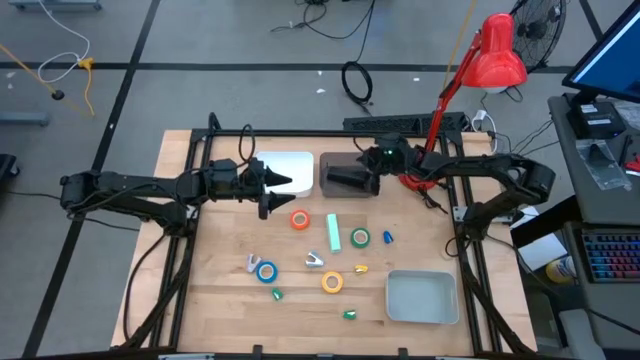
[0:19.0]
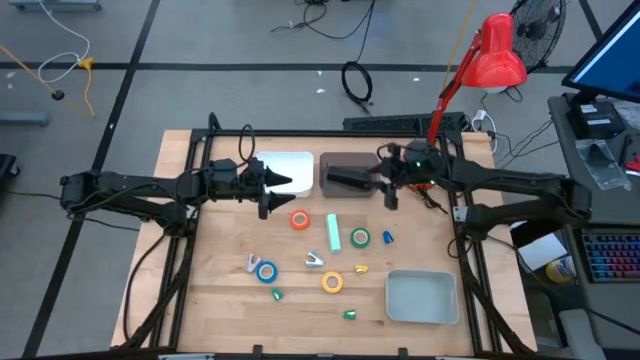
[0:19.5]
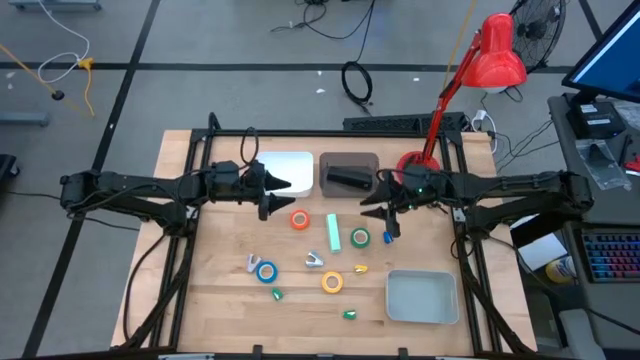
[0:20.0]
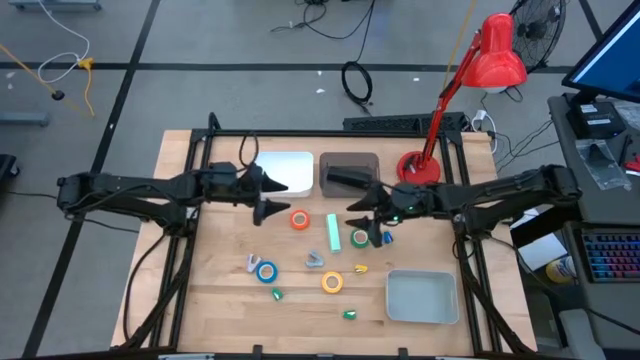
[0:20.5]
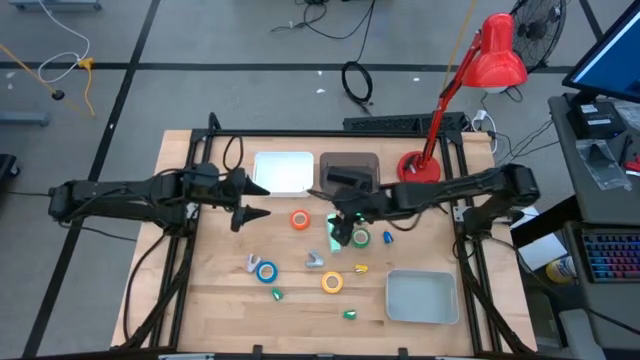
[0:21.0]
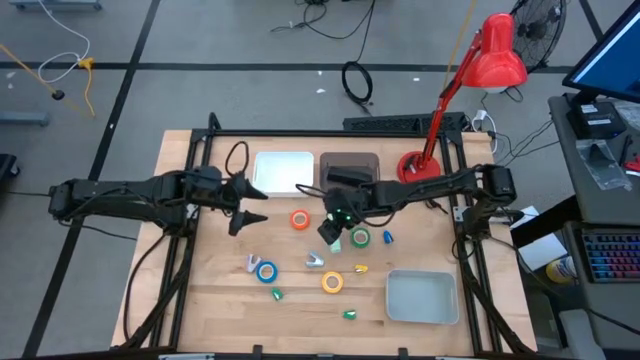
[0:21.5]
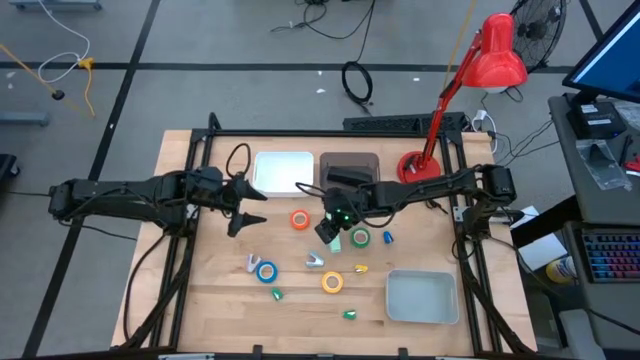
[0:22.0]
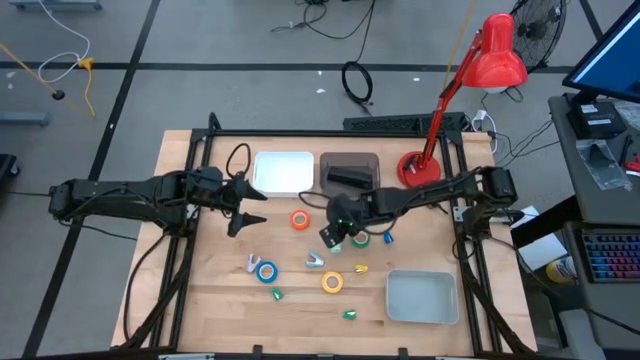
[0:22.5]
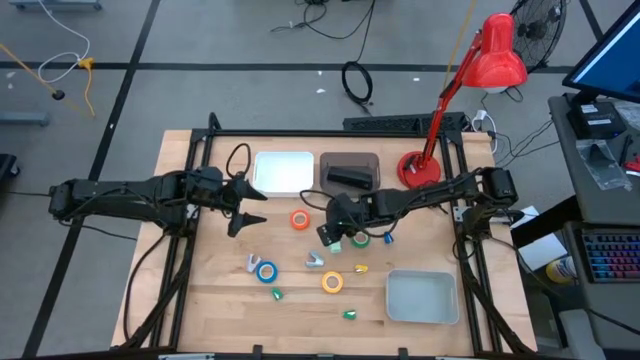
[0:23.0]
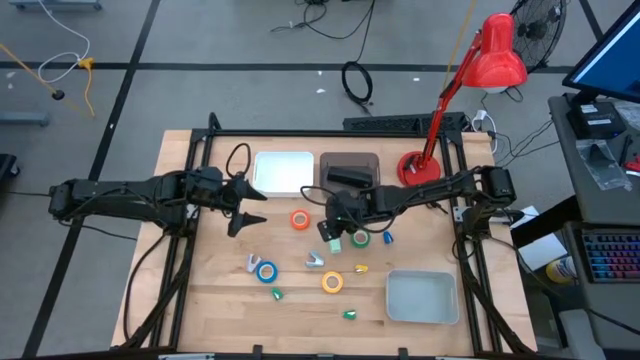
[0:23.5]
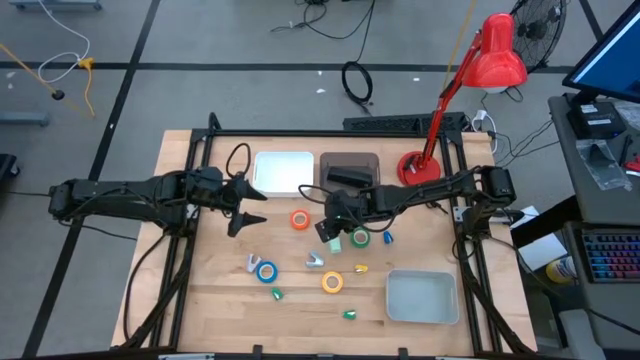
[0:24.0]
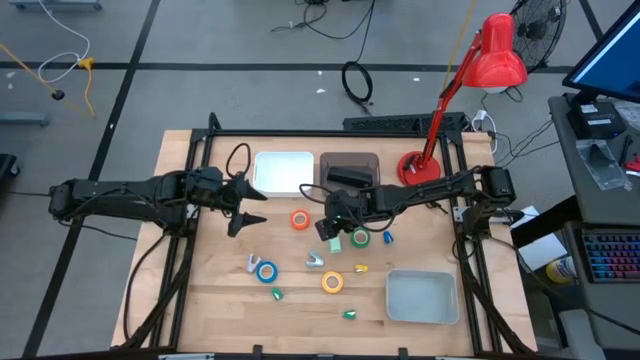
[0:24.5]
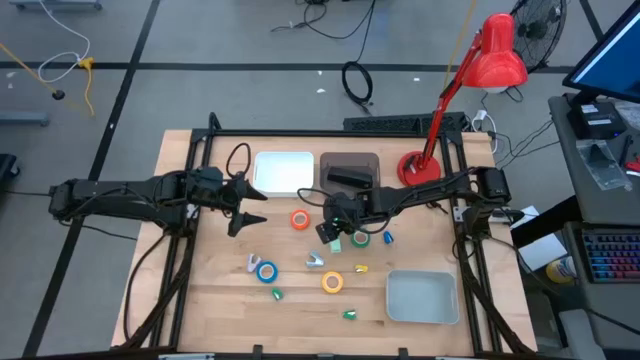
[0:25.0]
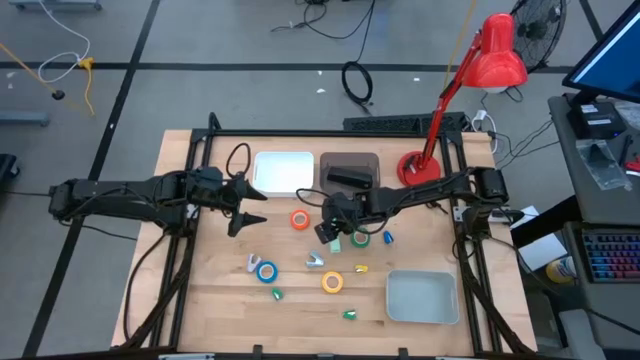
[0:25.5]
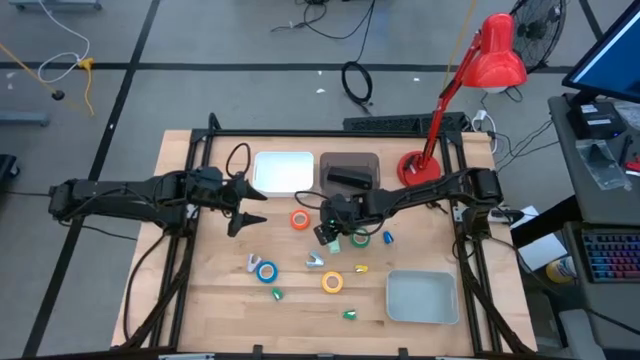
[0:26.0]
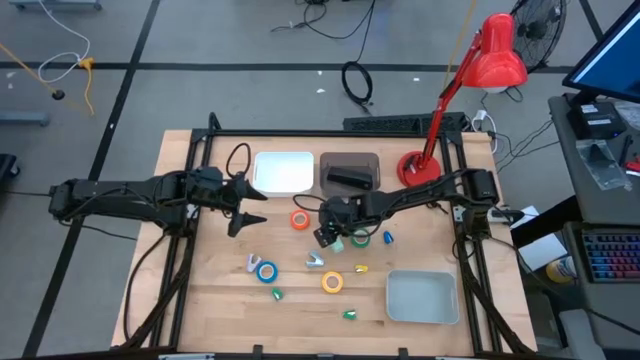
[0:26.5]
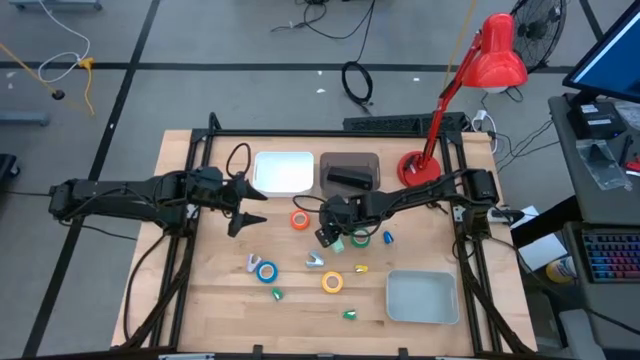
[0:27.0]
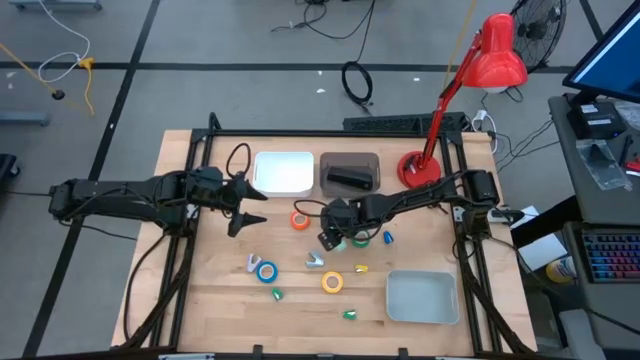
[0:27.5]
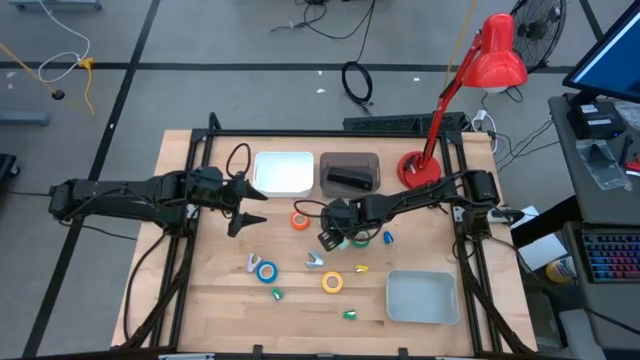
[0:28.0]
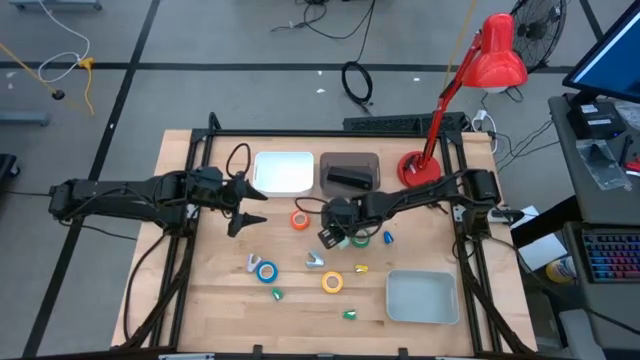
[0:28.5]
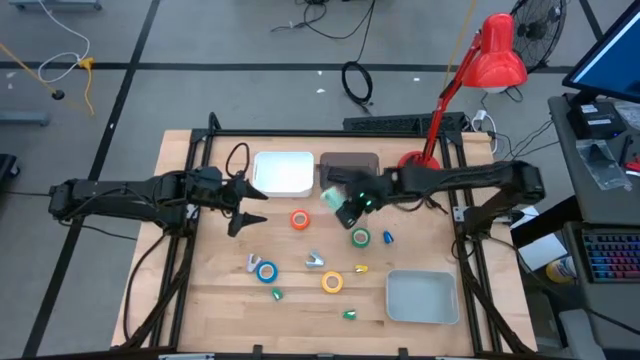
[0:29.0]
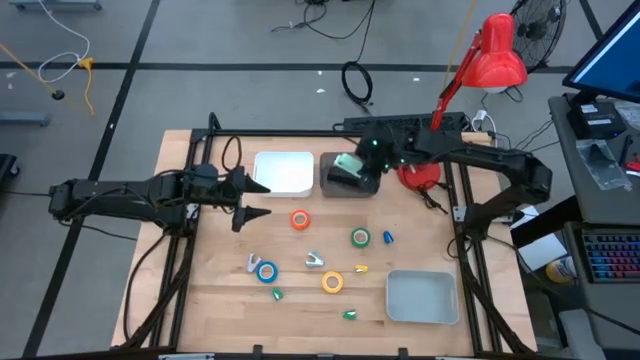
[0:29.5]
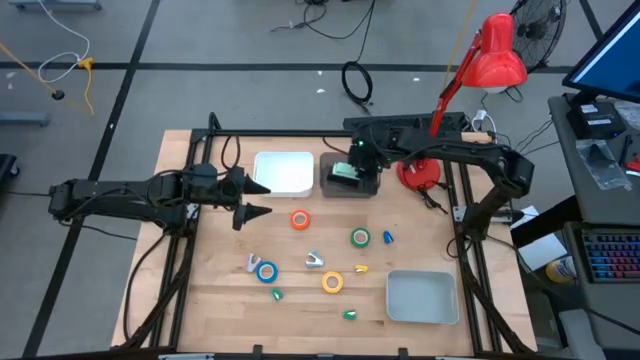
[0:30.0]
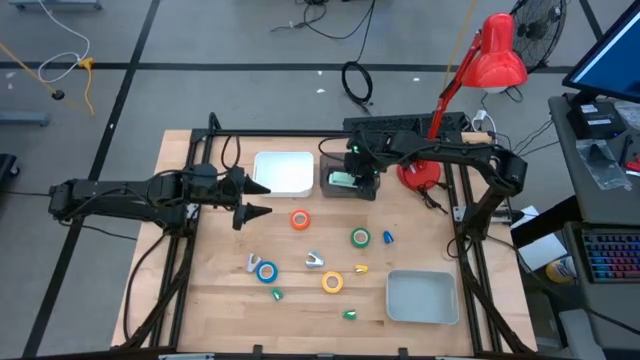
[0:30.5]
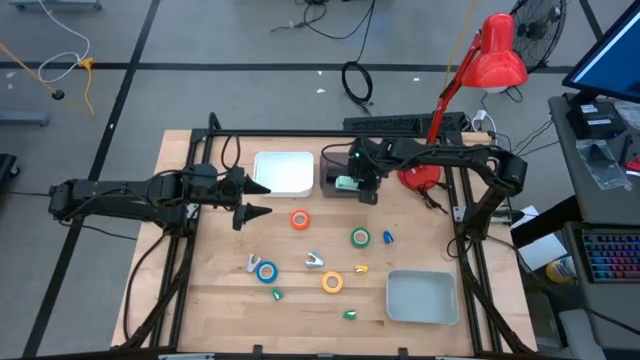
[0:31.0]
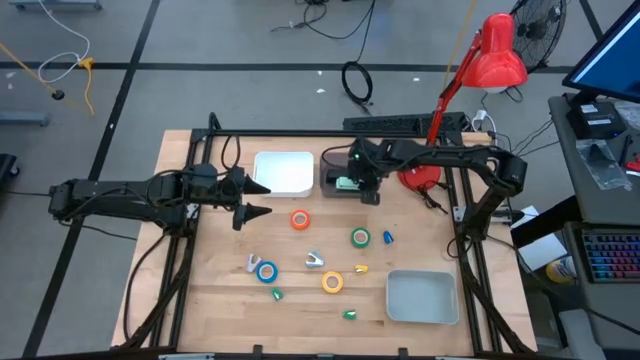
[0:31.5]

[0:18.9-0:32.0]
Task: Pick and place Stapler, Stapler remover, tape
Put the light green stapler into the black bin

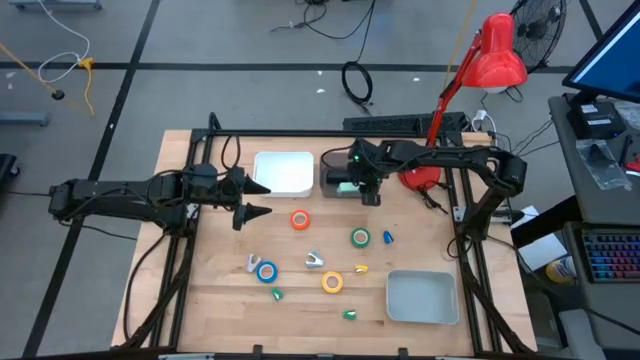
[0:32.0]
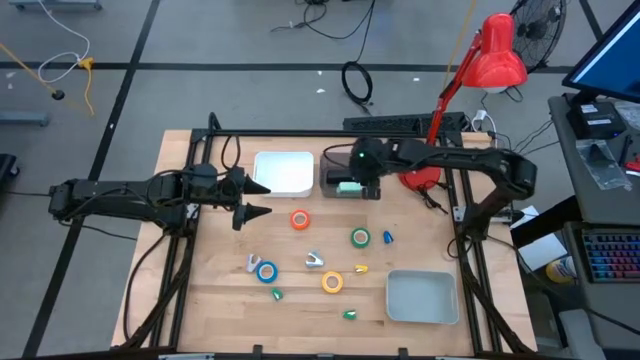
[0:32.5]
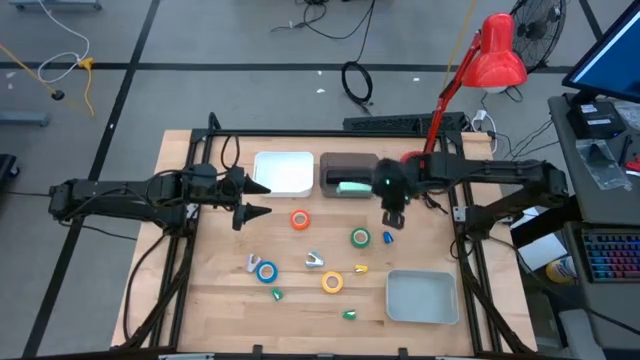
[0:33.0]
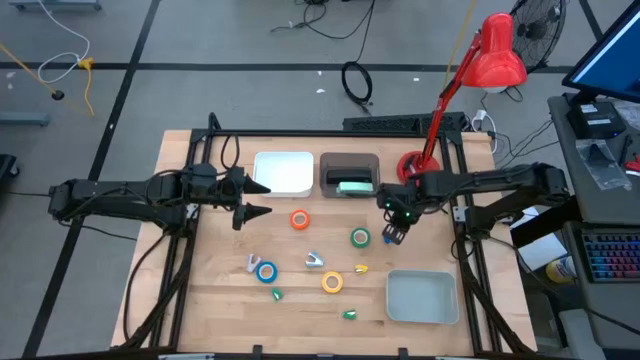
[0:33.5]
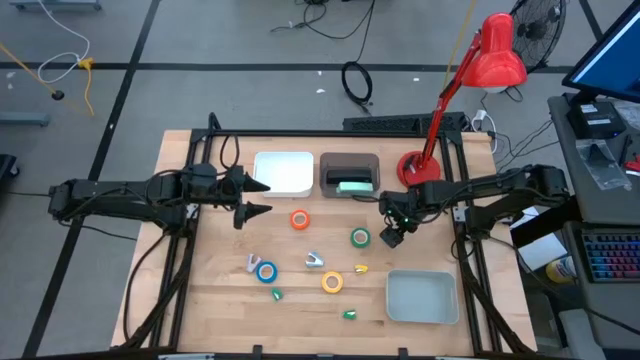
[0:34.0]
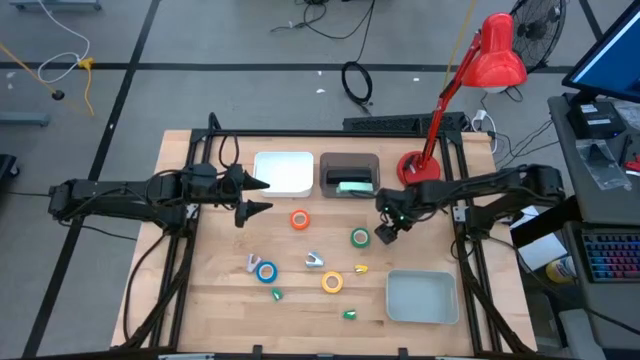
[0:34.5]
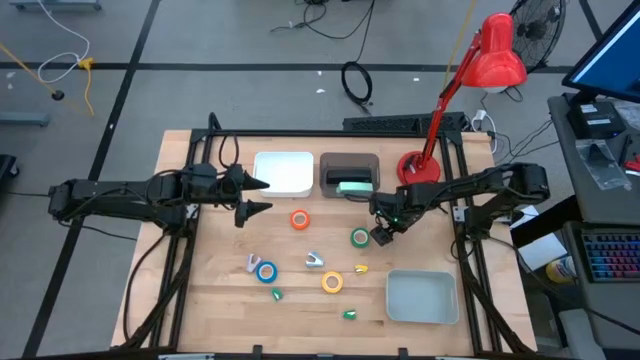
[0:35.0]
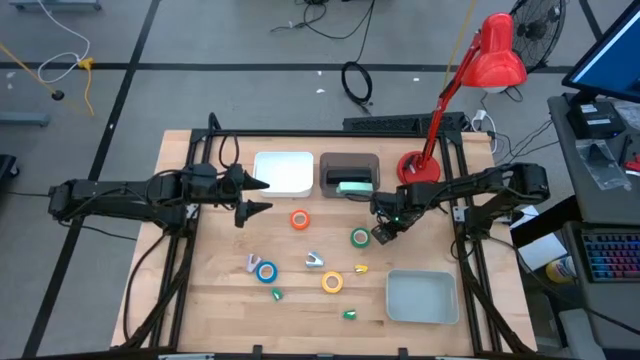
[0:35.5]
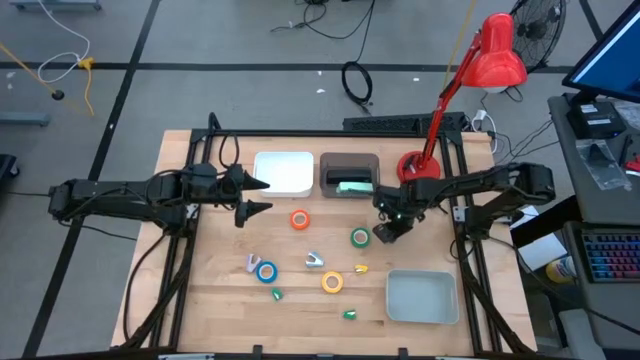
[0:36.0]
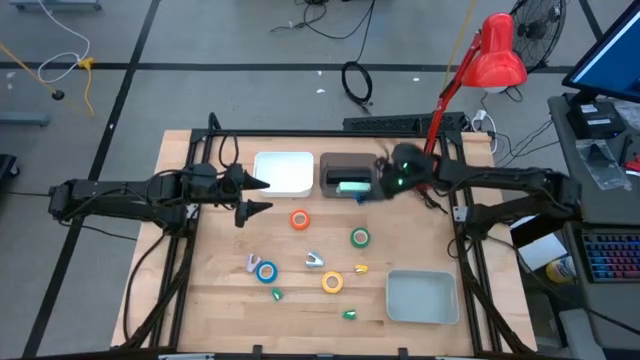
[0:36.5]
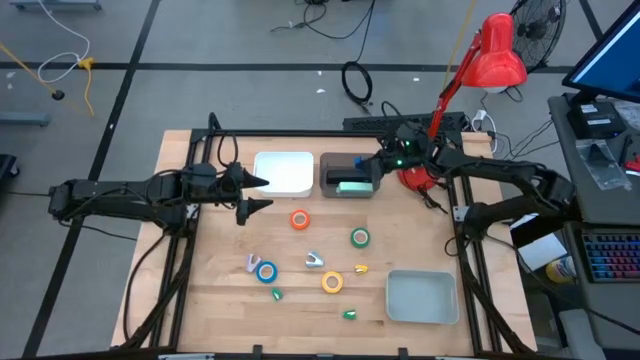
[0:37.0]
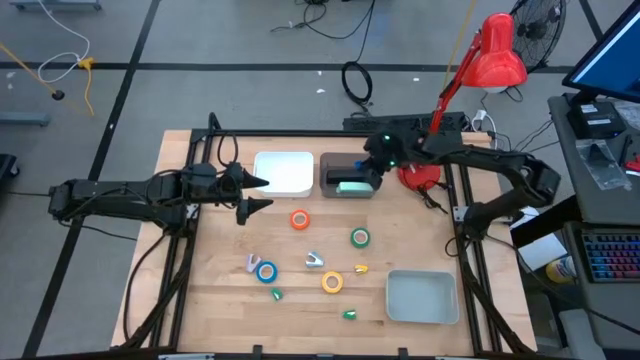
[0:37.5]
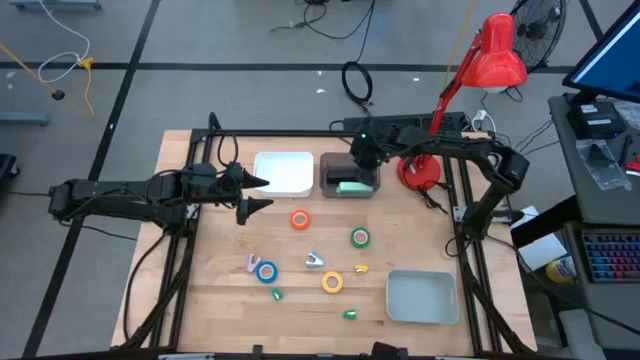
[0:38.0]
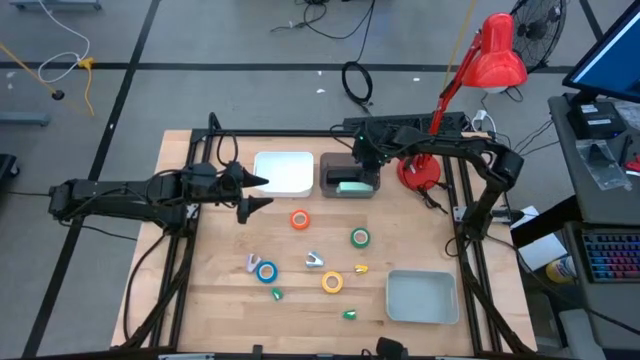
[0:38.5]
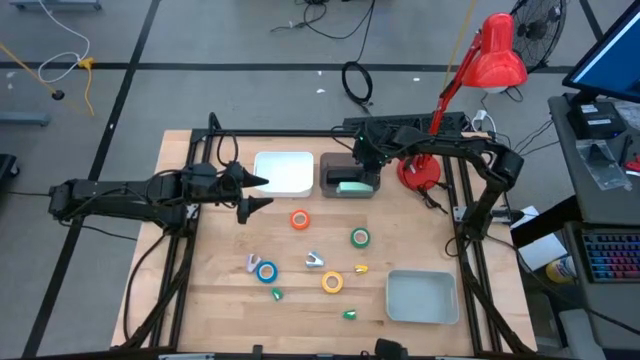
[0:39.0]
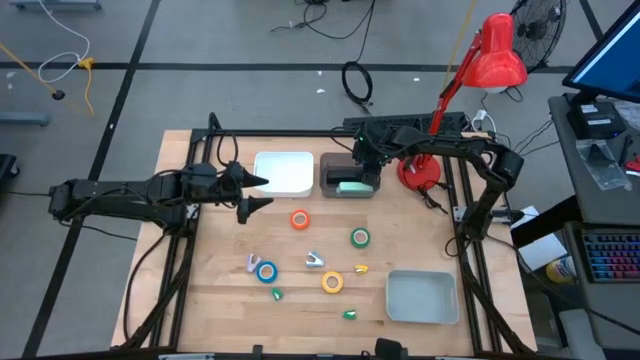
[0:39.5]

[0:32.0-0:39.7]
Put the blue stapler into the black bin
